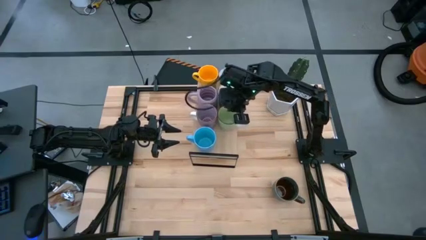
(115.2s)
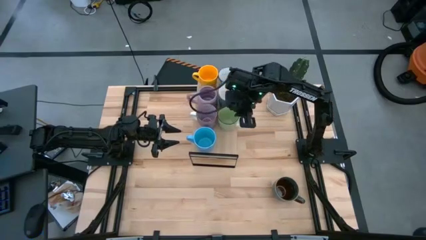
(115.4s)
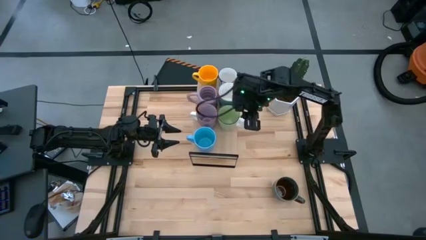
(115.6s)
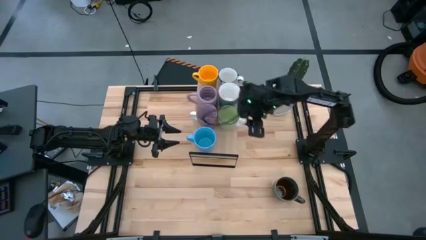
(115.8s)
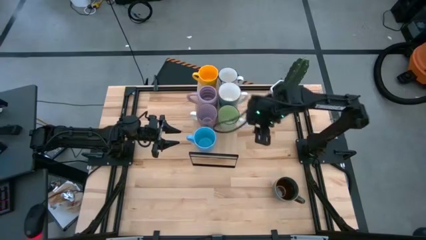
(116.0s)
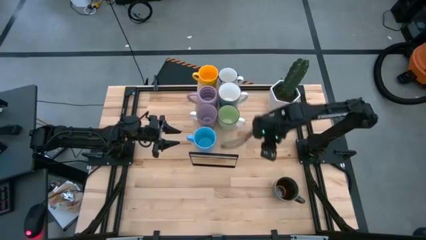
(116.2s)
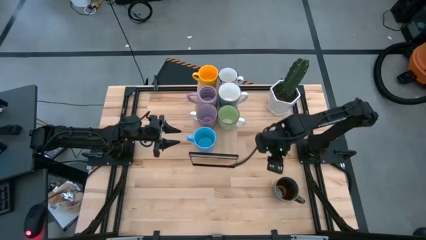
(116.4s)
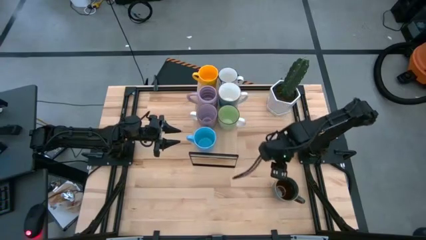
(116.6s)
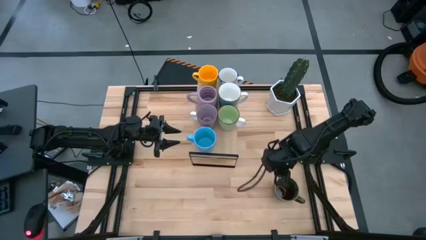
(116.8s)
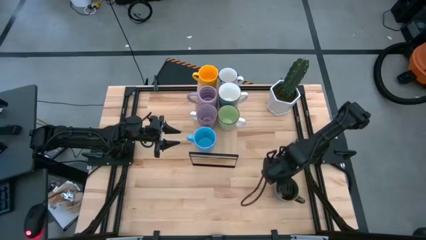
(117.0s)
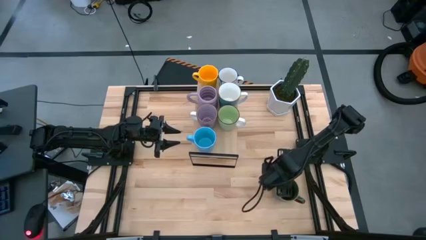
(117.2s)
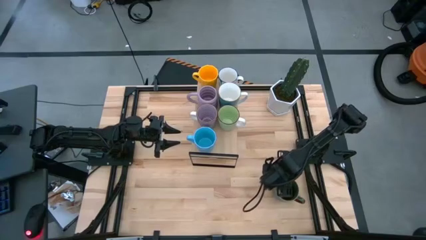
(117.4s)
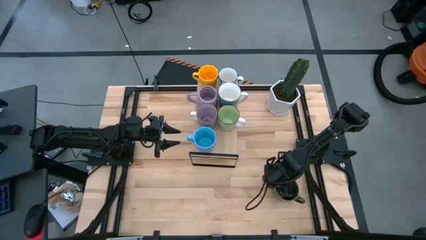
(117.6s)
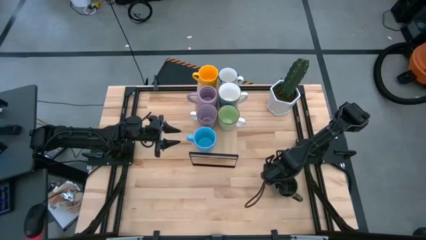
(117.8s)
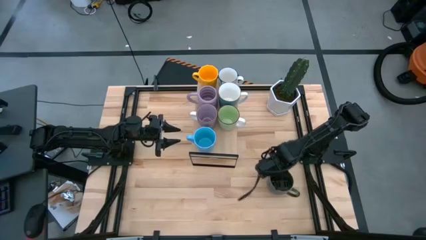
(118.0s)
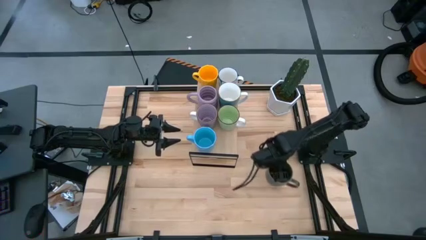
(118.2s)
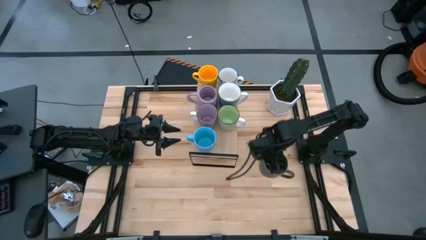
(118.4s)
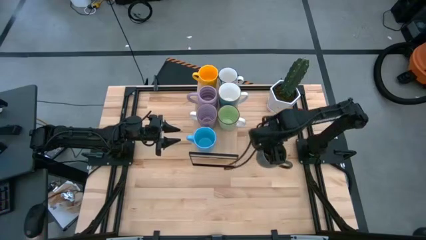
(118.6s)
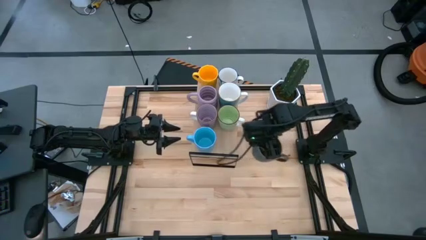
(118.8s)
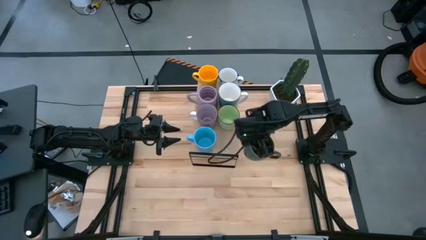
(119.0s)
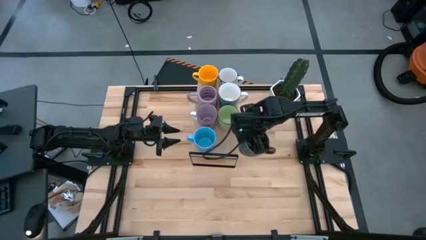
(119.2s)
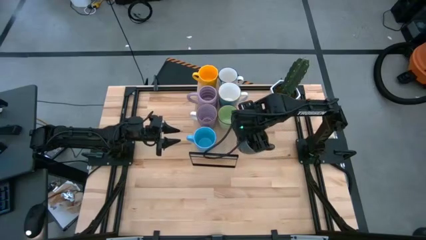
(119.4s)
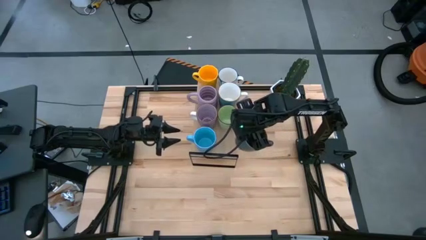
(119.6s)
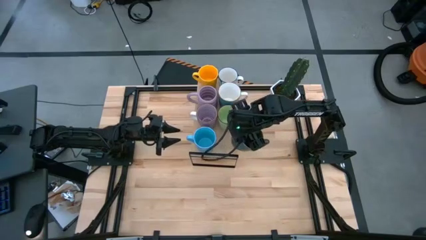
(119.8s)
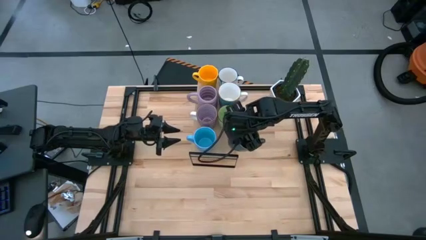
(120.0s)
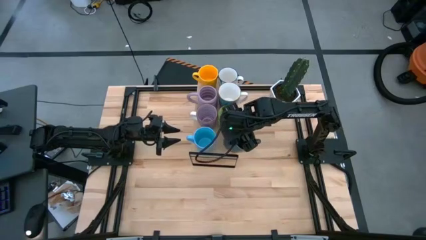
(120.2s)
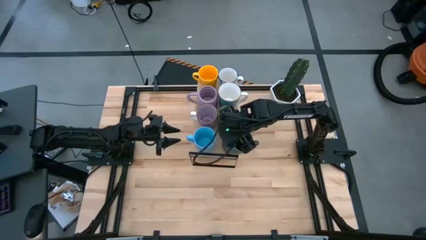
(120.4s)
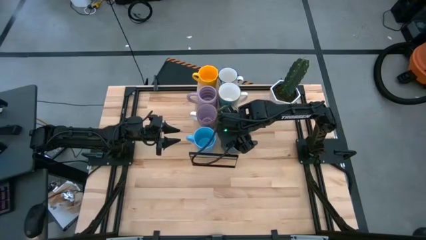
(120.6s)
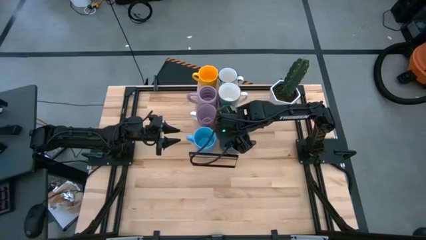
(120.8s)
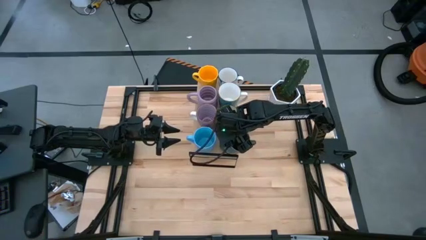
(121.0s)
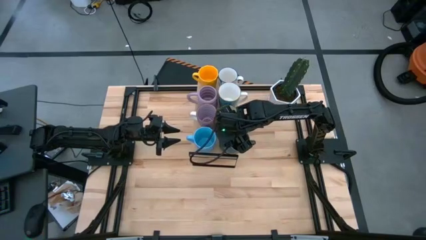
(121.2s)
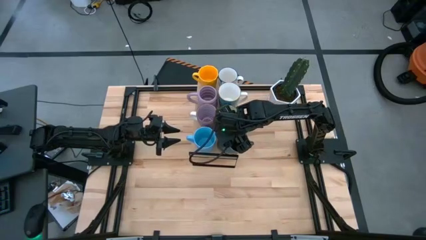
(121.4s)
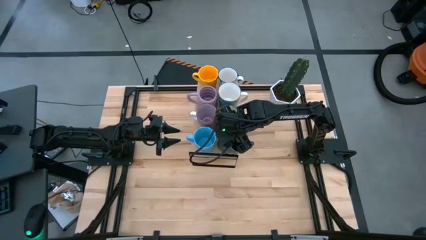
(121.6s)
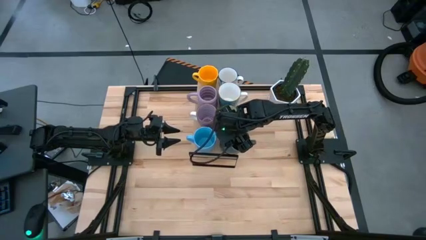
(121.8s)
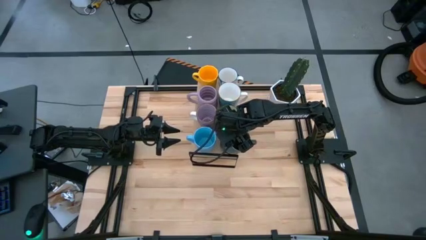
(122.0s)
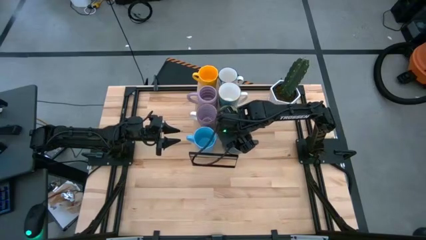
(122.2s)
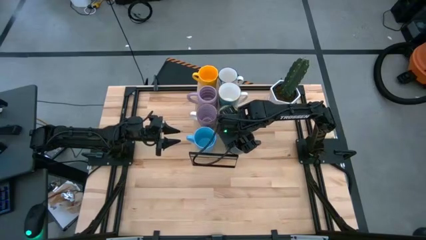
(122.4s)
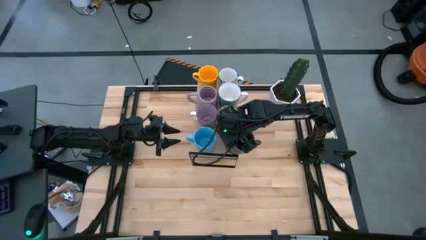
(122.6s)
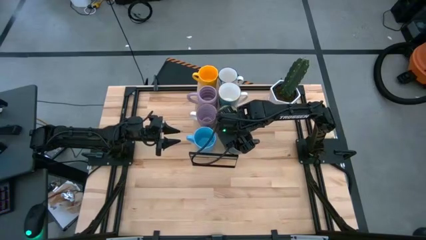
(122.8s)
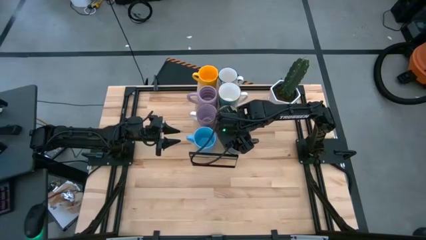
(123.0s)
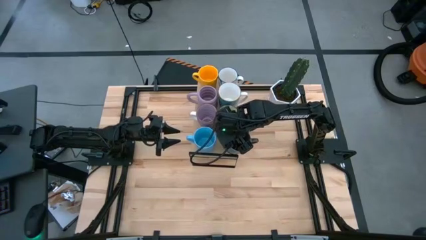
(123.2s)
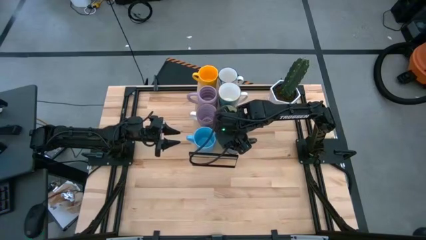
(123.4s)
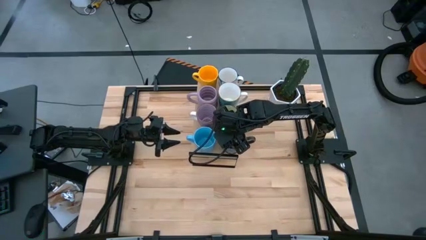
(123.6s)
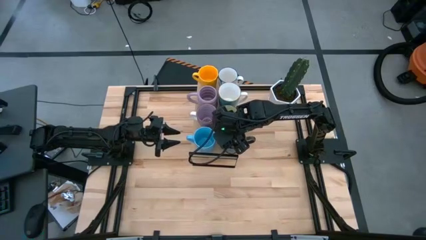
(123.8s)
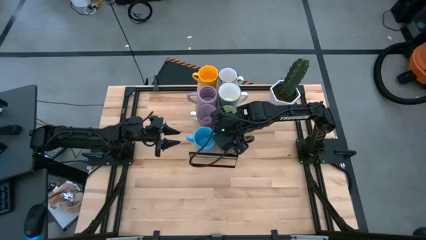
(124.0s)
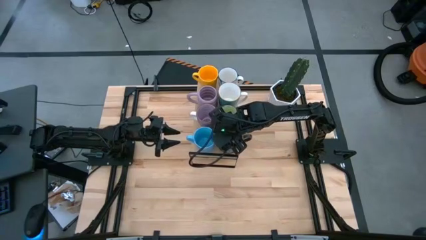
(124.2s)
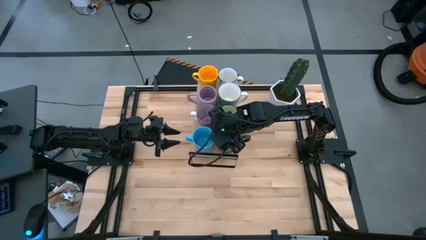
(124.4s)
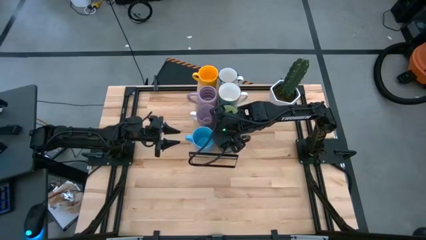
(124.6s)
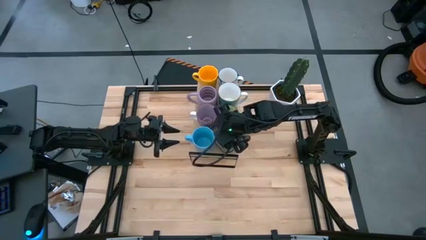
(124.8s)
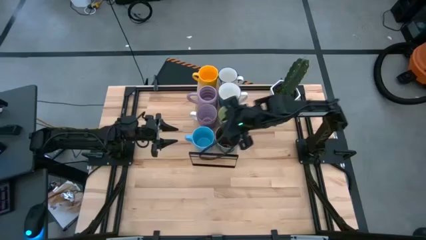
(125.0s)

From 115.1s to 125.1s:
Task: Place coffee mugs
Put the dark blue mug on the shelf aligned with the light green

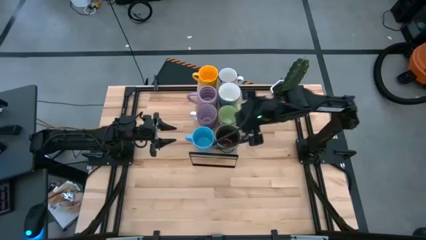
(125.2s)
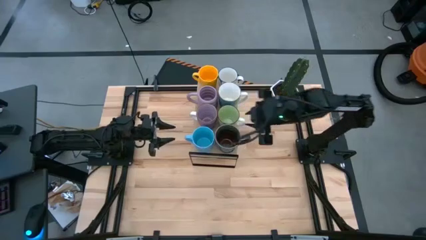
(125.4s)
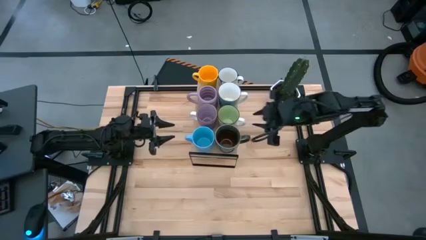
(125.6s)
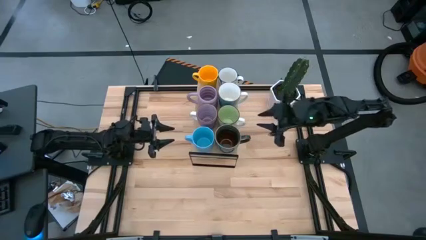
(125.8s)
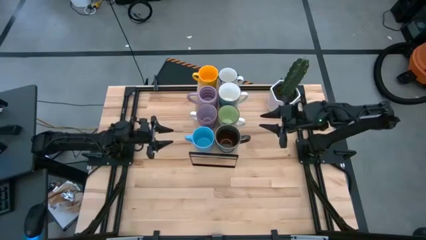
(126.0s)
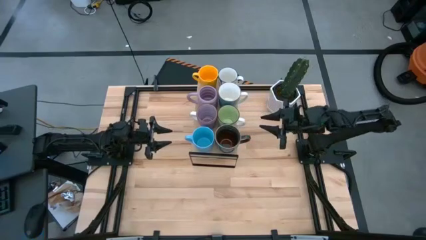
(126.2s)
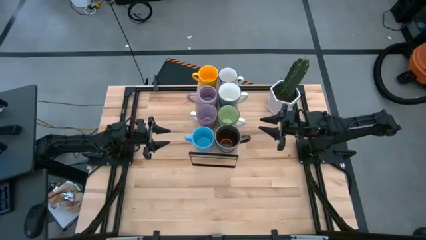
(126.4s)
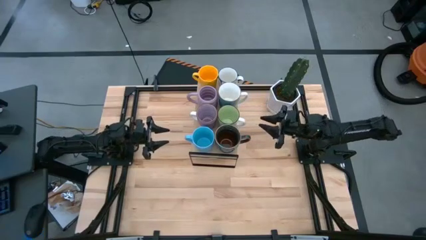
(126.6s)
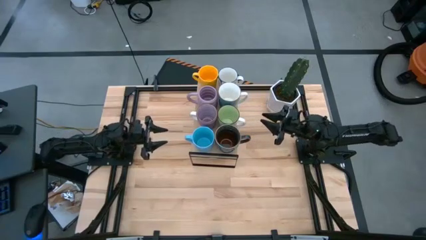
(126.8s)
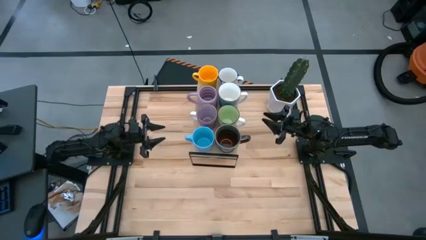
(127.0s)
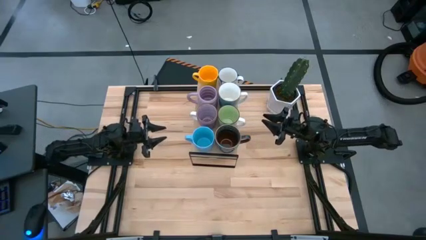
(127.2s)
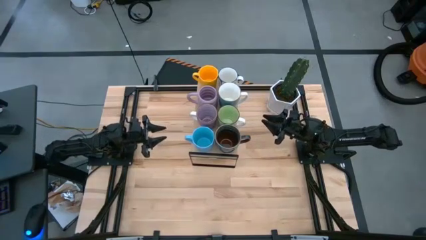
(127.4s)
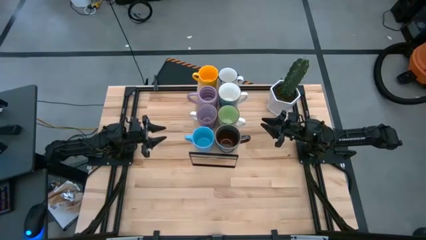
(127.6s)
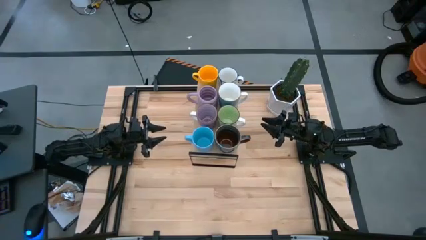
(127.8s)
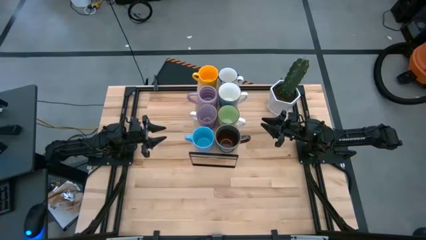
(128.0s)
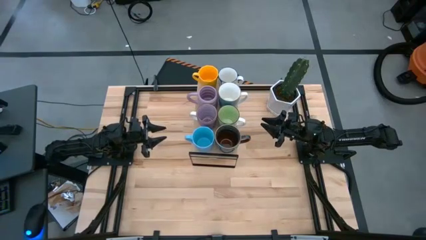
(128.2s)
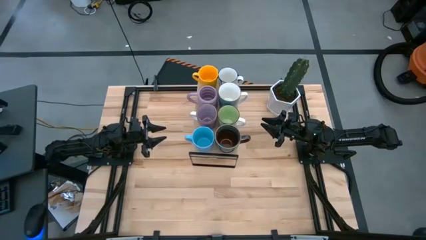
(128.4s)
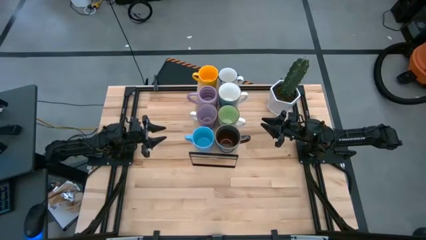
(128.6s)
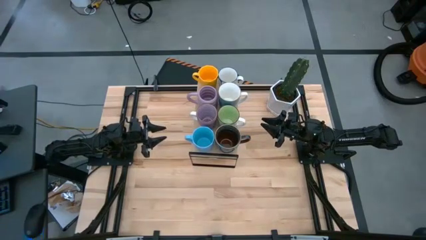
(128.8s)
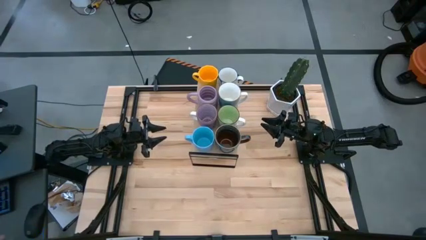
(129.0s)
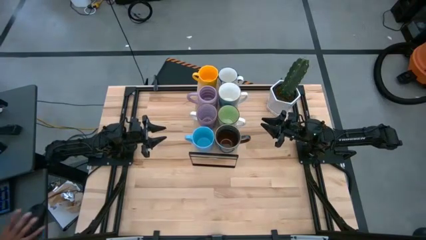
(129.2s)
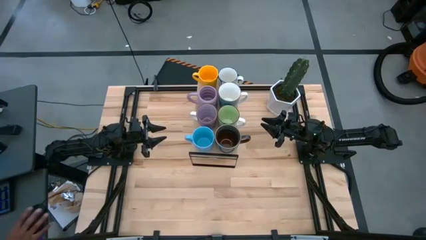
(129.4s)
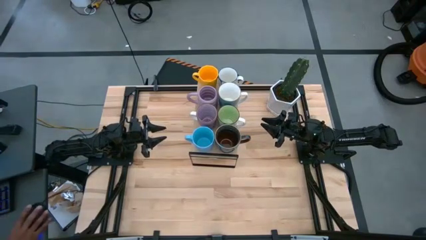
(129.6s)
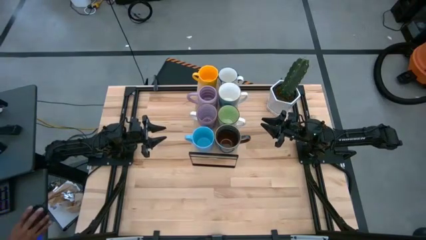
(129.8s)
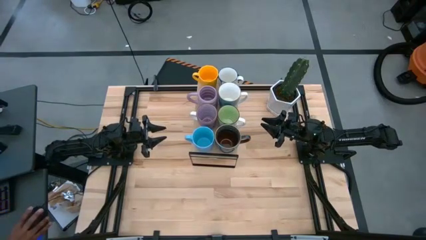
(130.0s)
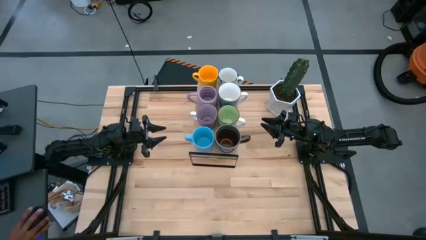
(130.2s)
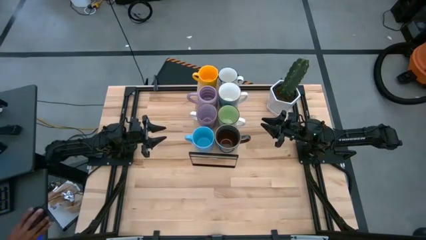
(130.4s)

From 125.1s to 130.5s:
Return to Home Position
